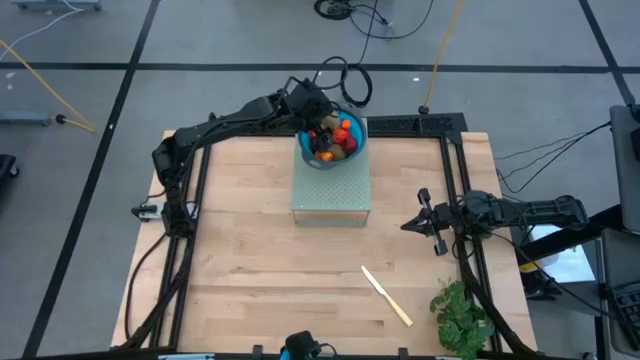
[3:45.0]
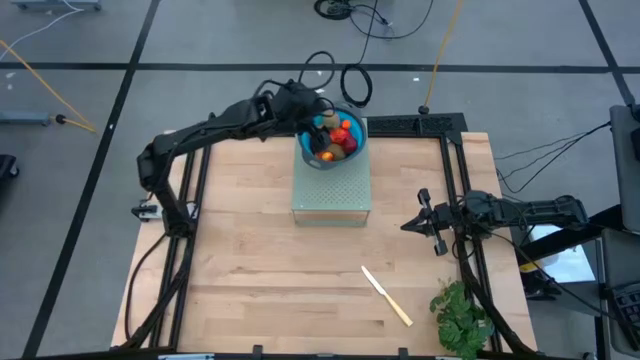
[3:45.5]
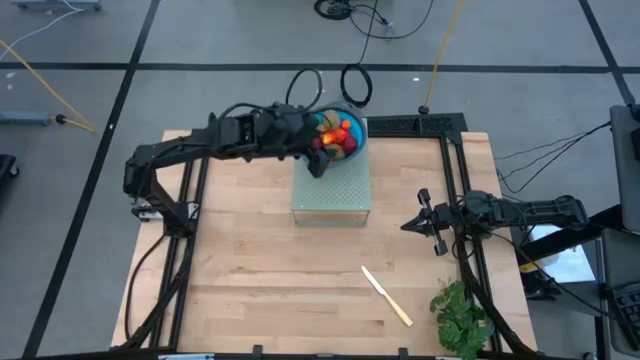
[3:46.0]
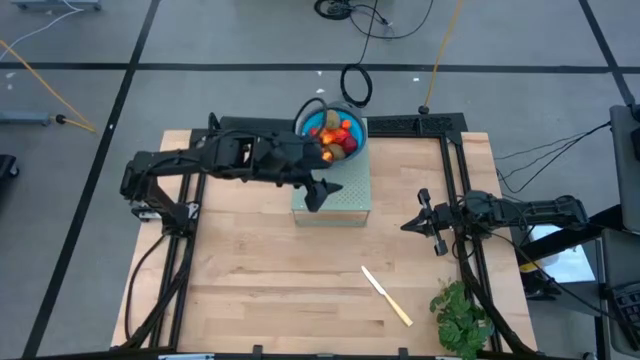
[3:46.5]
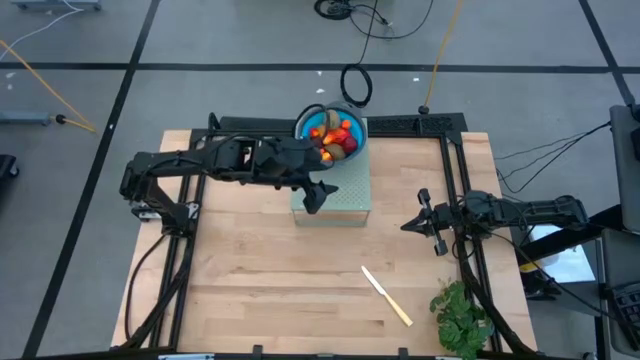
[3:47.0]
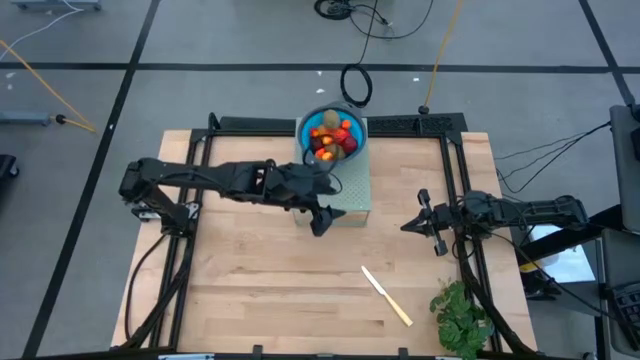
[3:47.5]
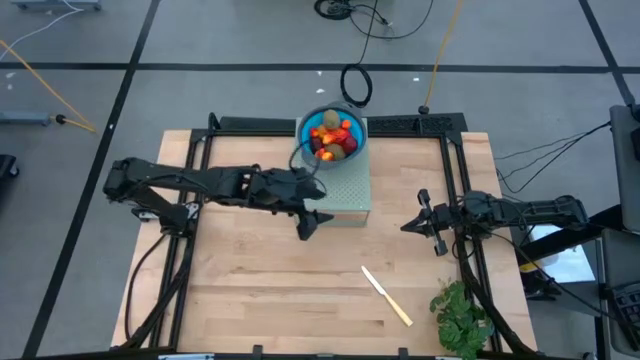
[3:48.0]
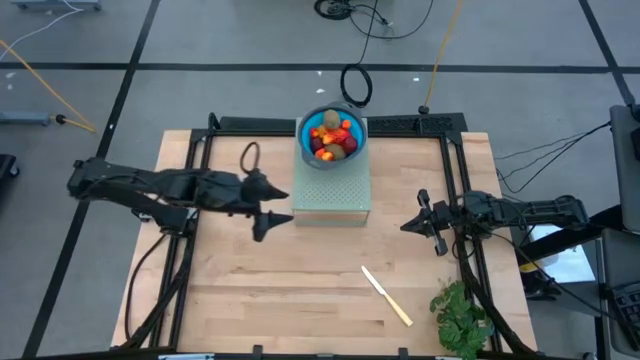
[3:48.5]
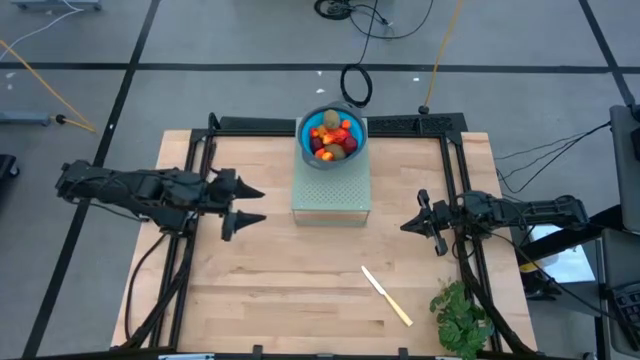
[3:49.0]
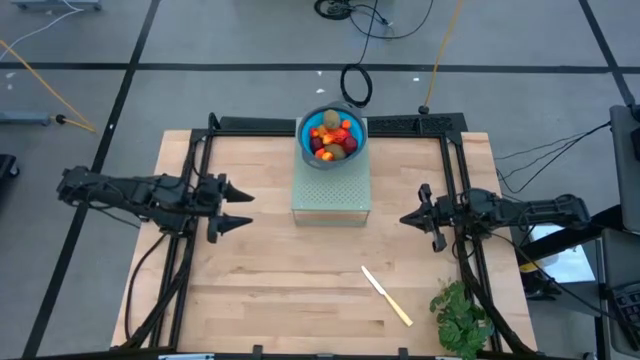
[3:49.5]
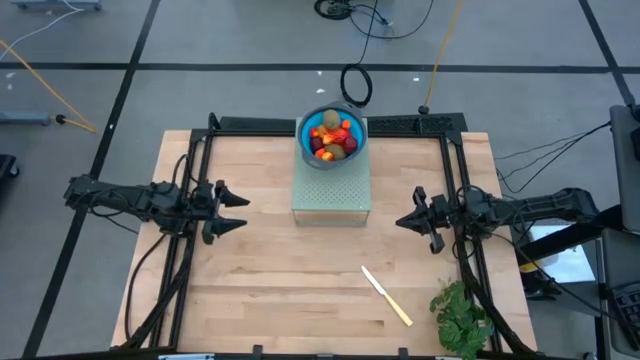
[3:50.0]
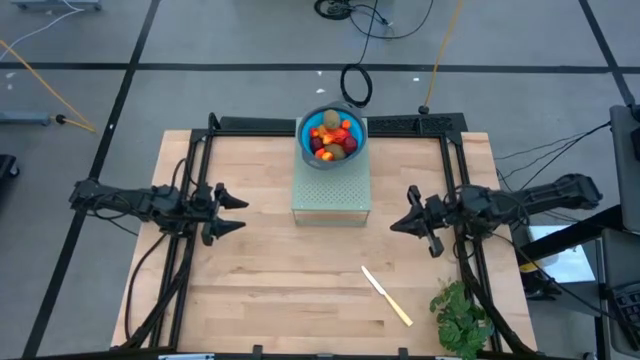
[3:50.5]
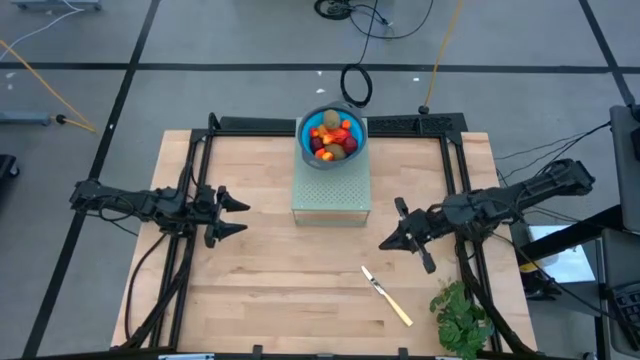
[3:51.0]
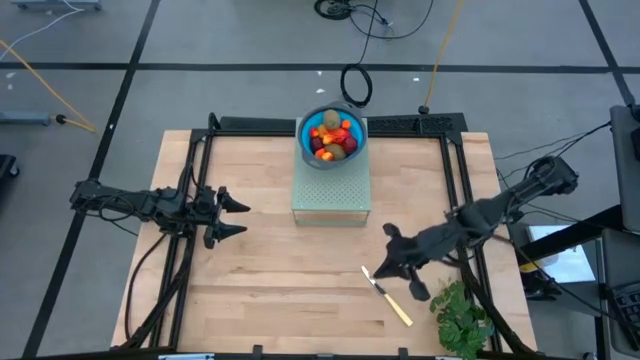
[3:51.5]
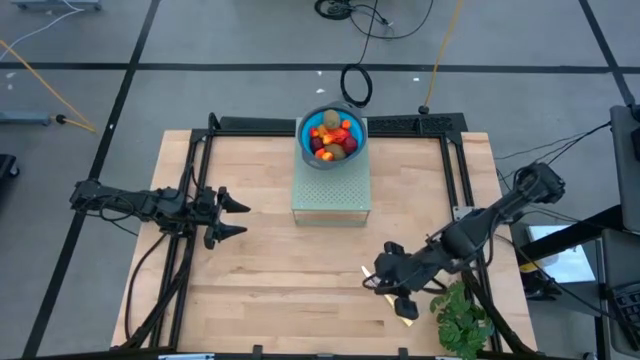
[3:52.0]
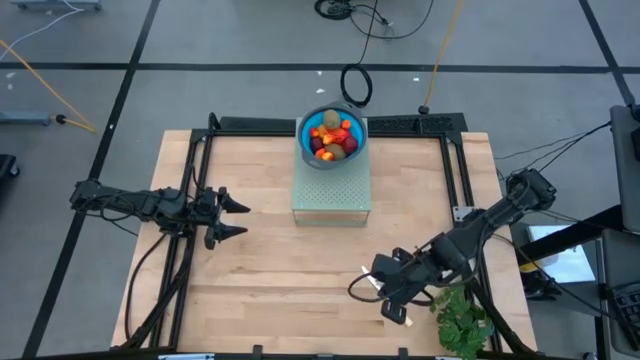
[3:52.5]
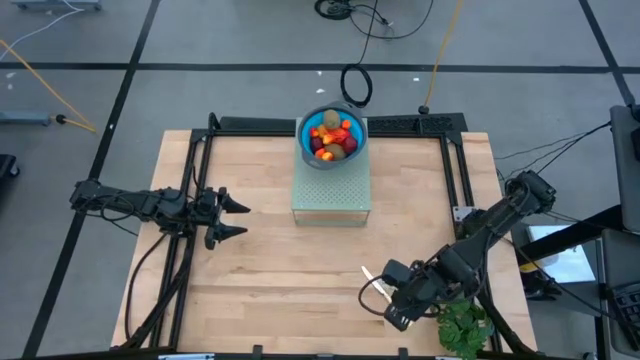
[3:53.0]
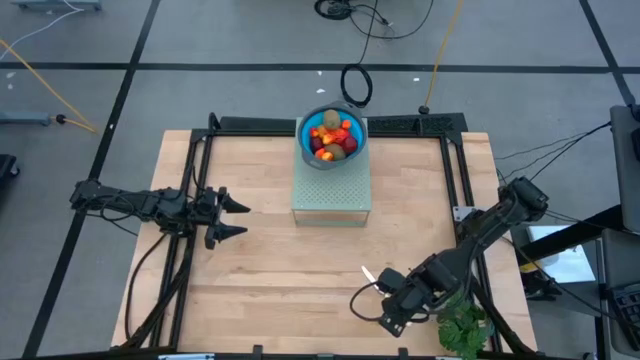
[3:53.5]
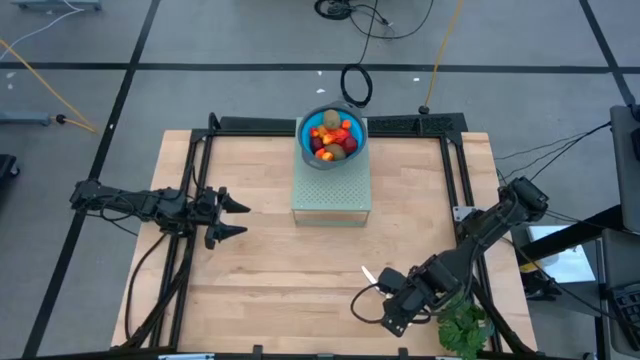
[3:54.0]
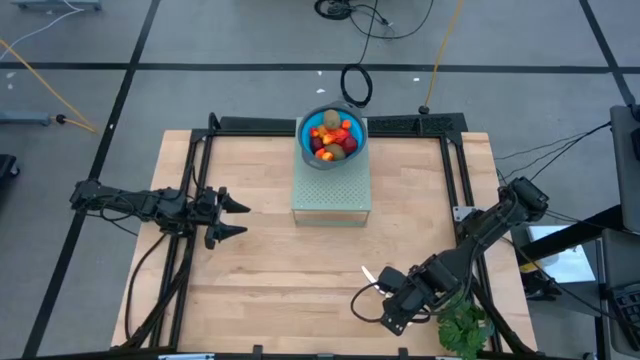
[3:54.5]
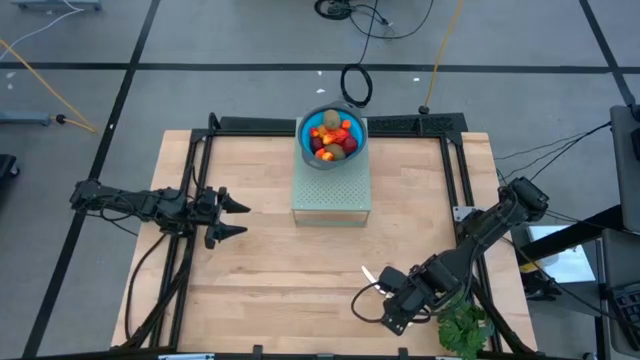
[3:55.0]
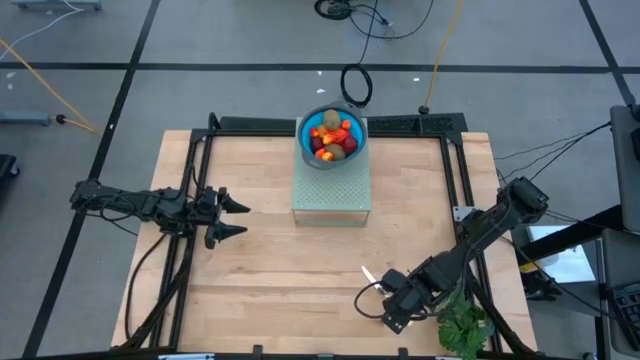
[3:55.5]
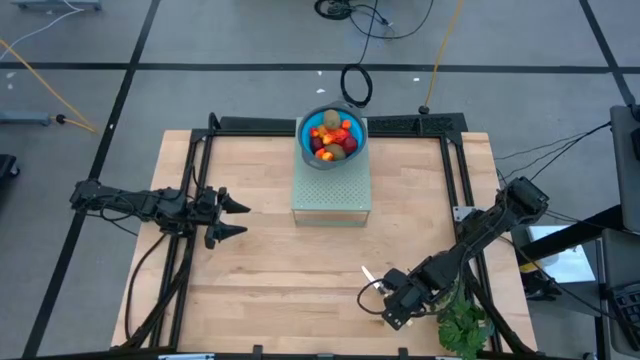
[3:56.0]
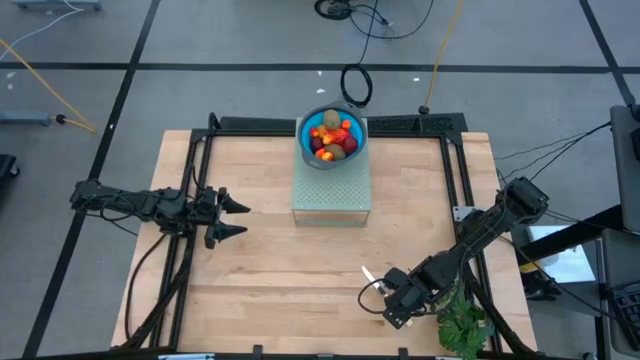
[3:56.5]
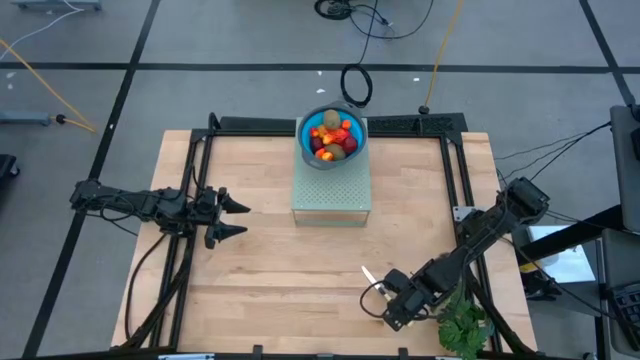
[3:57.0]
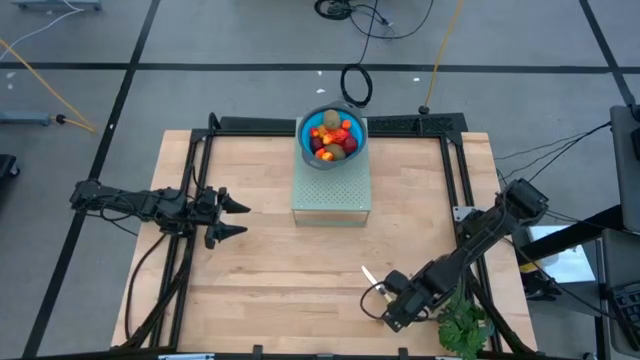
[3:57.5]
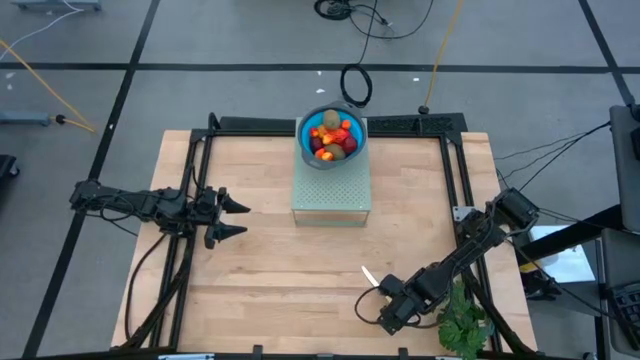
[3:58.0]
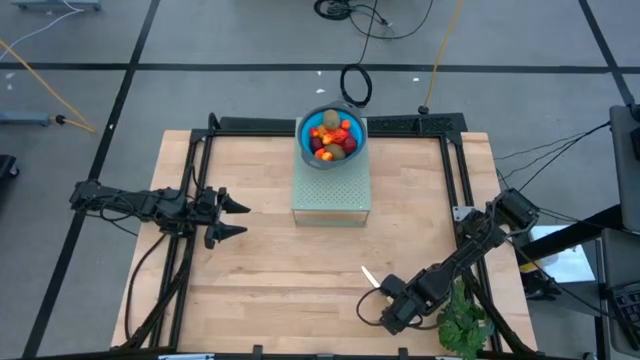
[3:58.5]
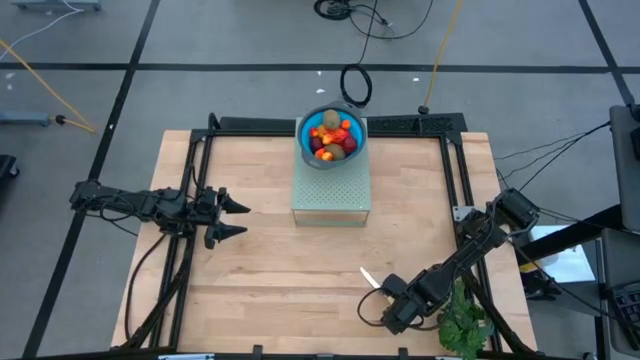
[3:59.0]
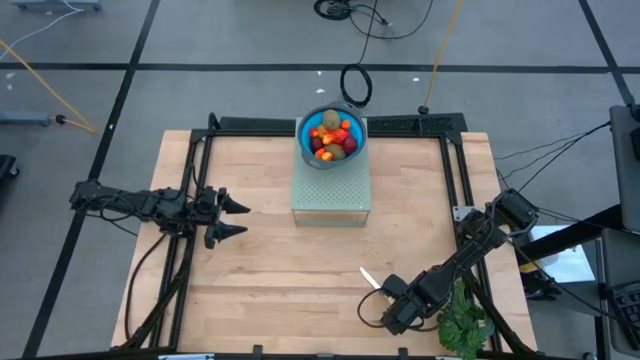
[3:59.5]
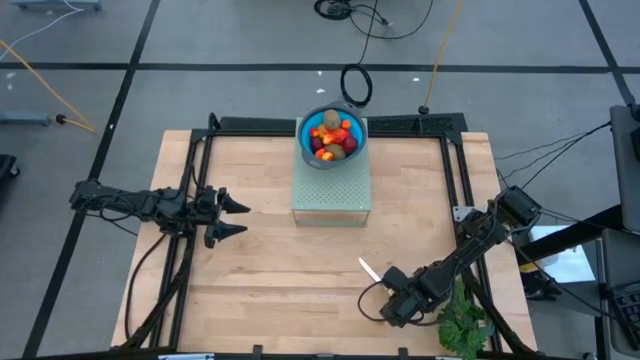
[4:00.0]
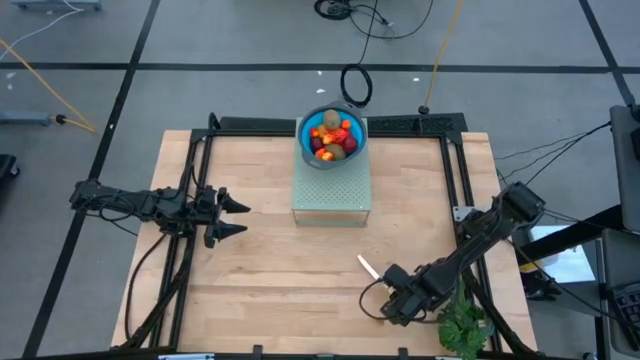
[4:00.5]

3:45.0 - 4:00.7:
Task: Pick & Place Fruit
Put the knife on the shelf

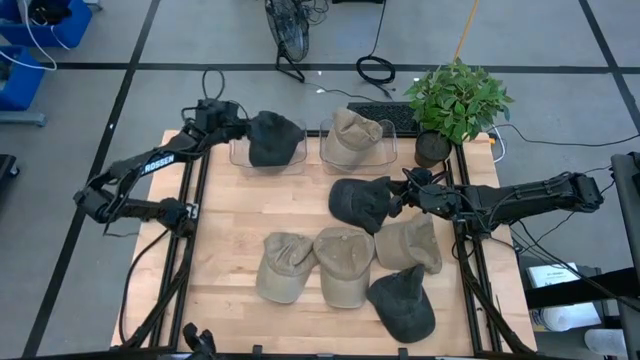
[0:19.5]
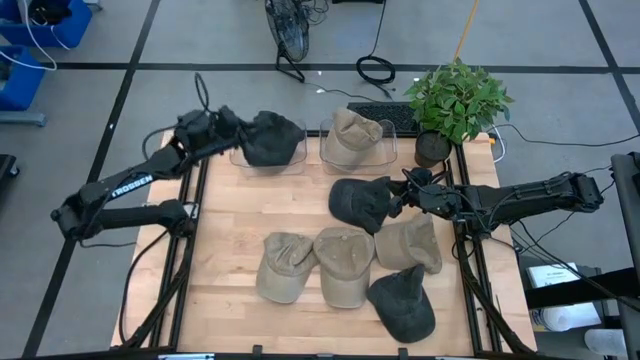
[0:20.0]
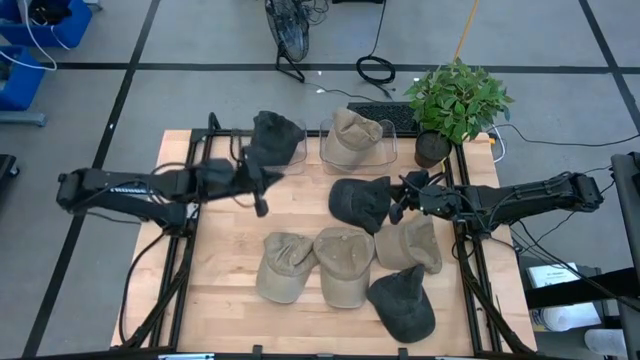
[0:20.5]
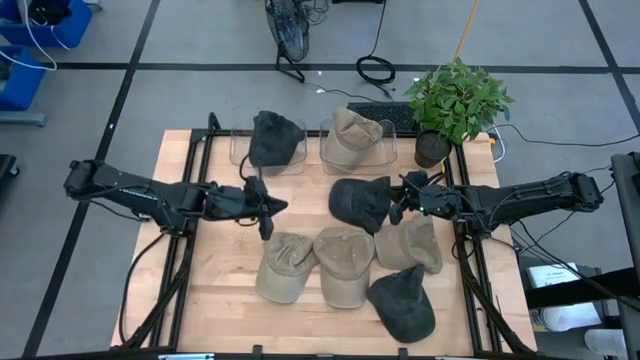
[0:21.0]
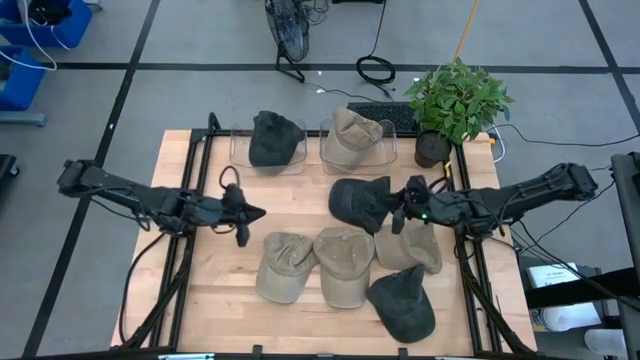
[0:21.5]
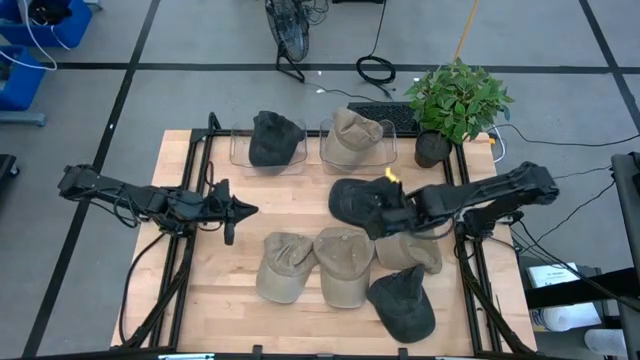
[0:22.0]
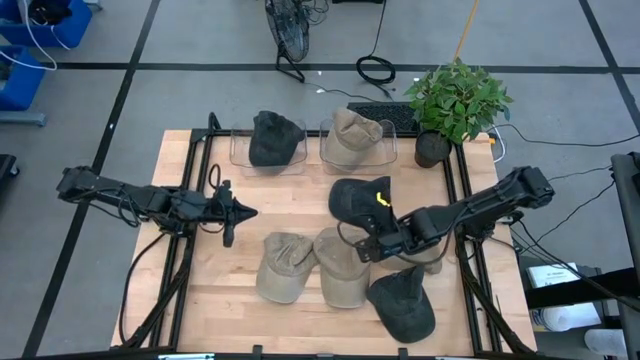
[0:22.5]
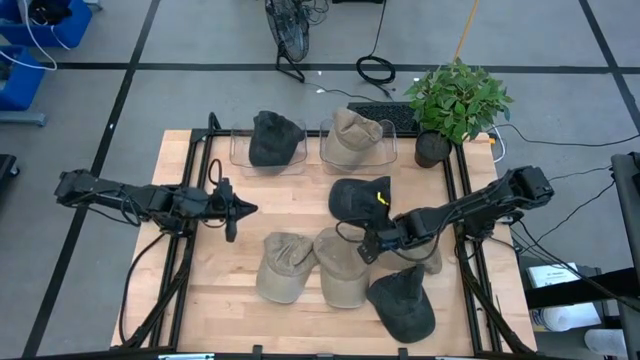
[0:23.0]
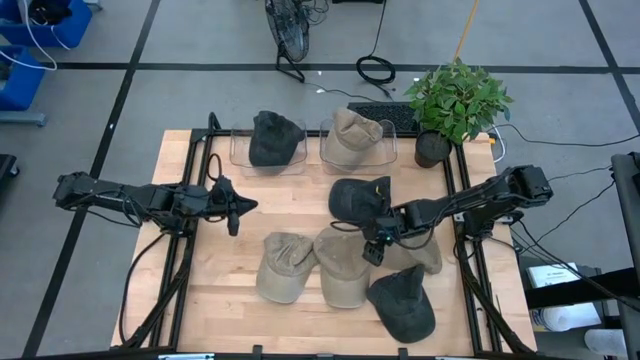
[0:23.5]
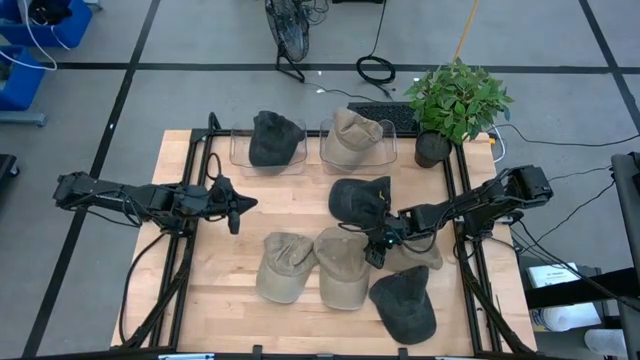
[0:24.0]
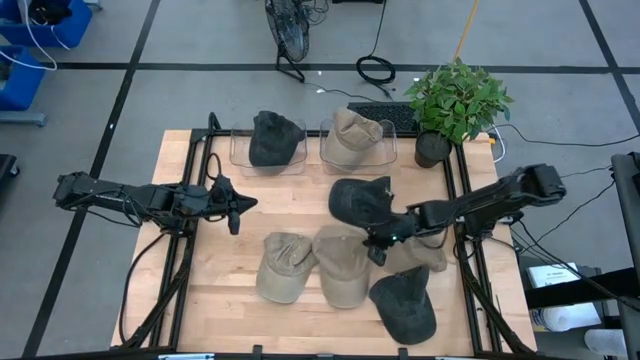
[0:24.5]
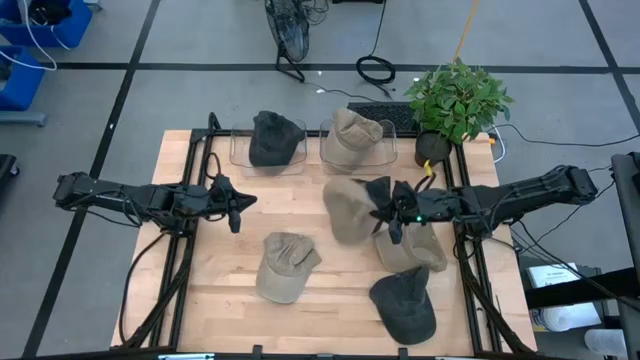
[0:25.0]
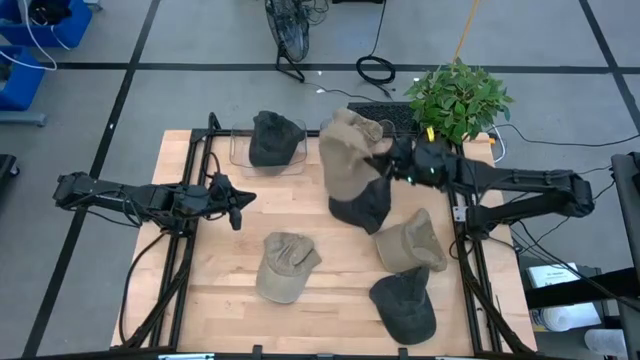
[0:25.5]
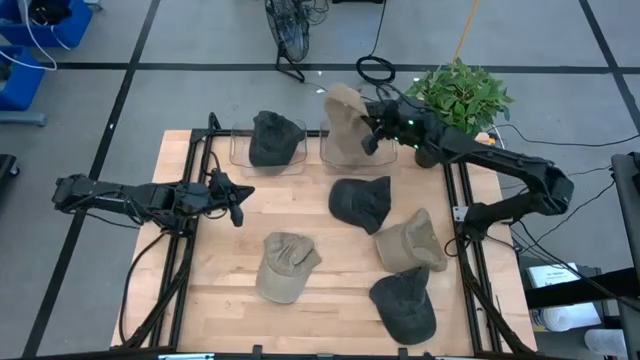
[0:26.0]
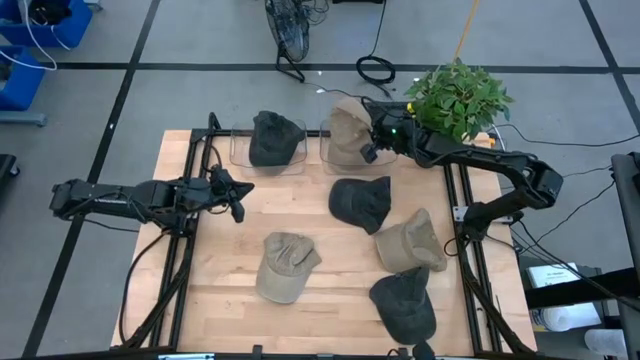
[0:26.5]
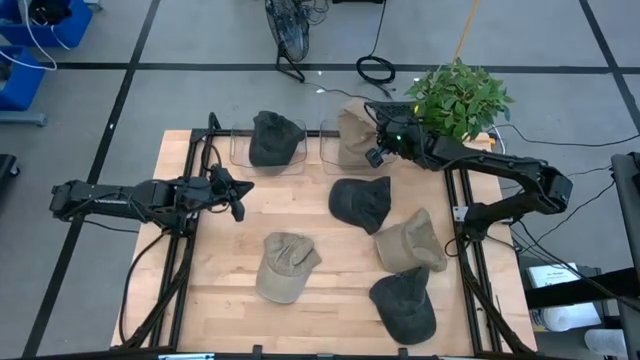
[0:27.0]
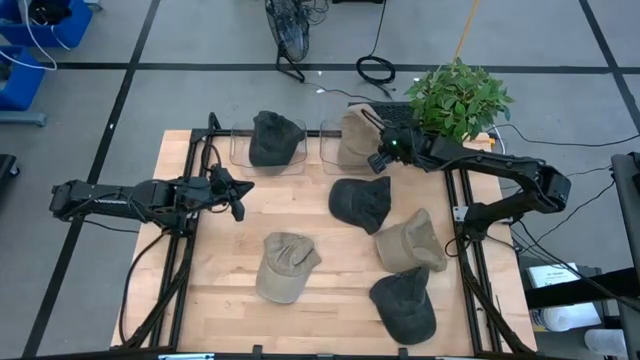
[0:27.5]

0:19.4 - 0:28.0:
Task: Pick & Place hat
Put the brown cap into the right transparent bin
